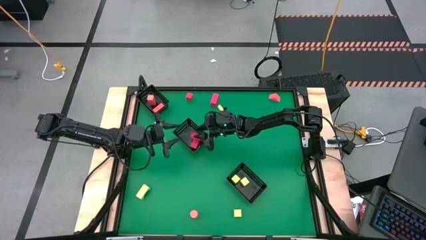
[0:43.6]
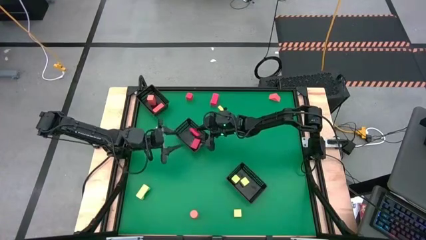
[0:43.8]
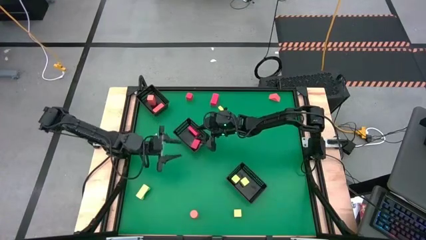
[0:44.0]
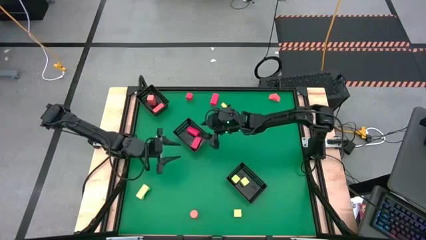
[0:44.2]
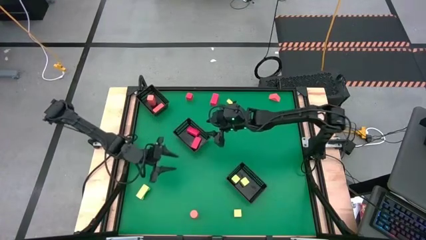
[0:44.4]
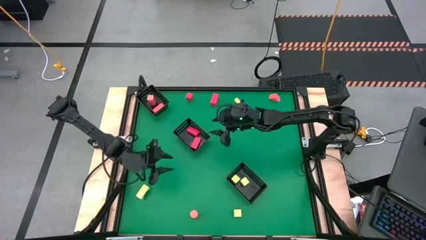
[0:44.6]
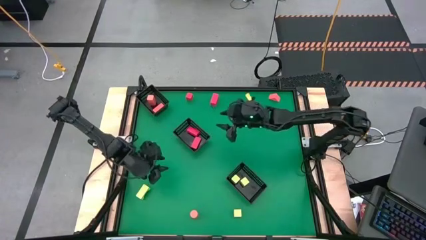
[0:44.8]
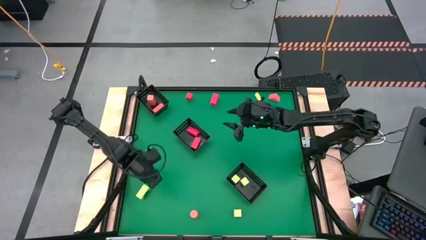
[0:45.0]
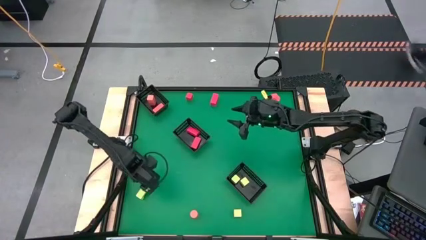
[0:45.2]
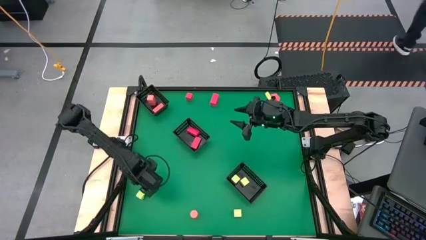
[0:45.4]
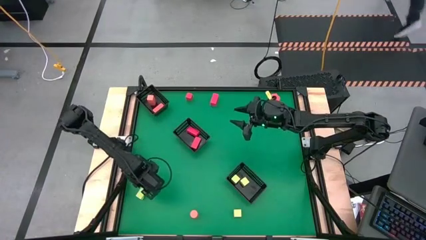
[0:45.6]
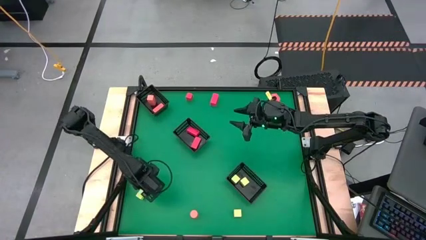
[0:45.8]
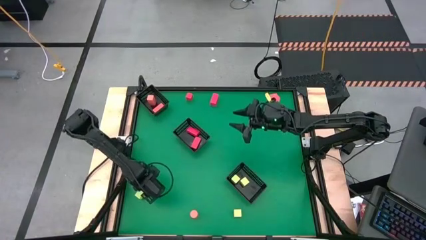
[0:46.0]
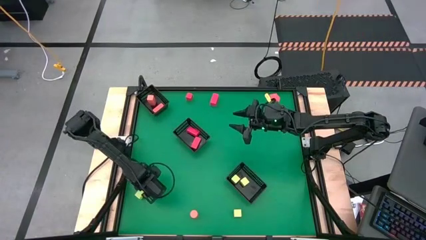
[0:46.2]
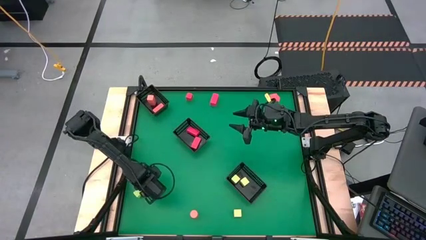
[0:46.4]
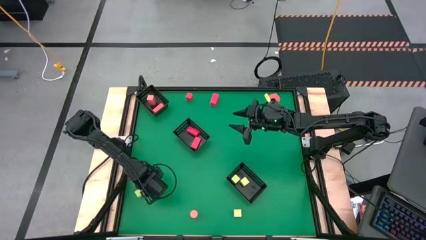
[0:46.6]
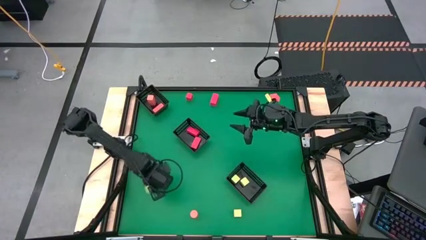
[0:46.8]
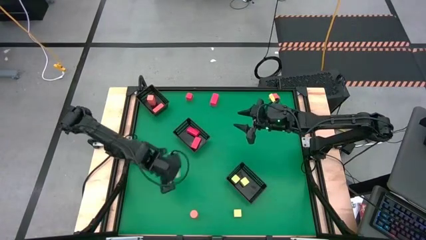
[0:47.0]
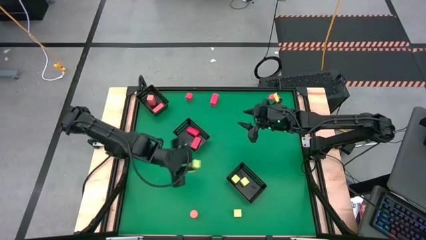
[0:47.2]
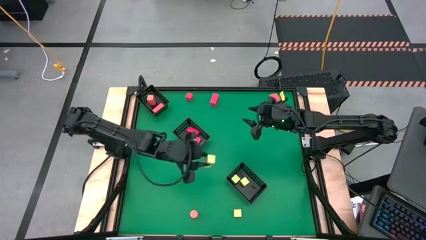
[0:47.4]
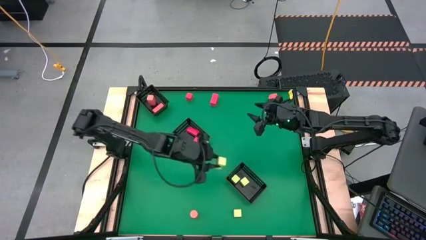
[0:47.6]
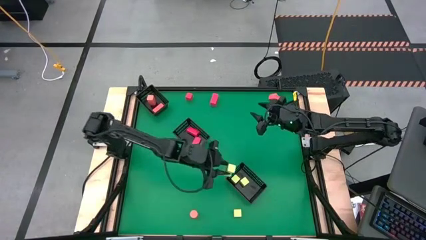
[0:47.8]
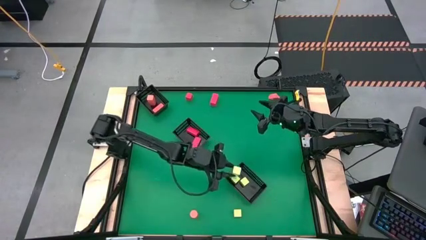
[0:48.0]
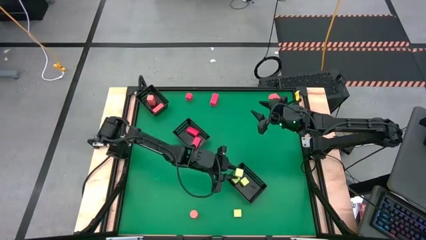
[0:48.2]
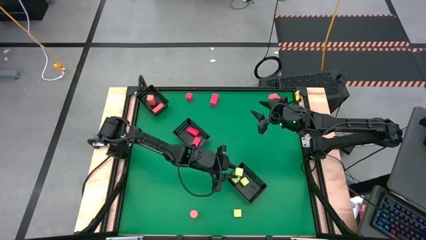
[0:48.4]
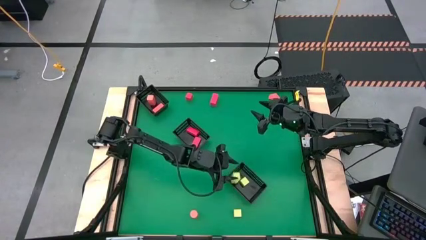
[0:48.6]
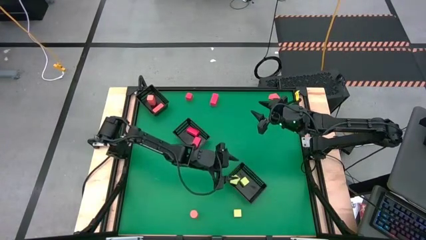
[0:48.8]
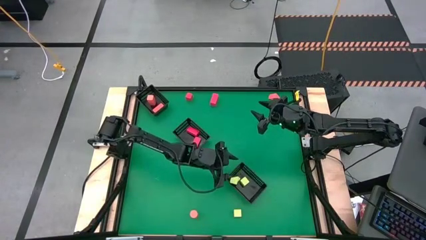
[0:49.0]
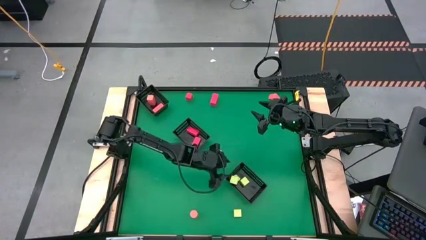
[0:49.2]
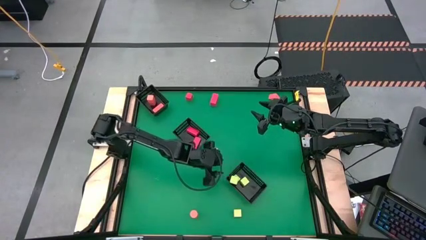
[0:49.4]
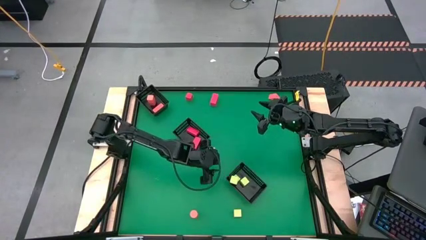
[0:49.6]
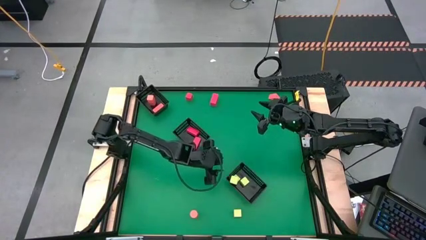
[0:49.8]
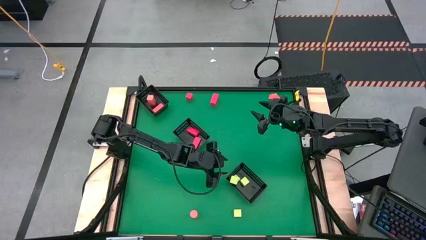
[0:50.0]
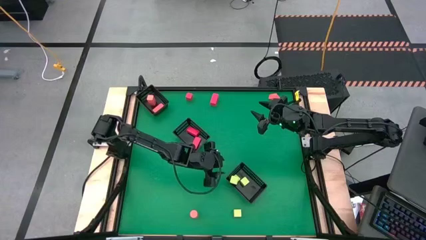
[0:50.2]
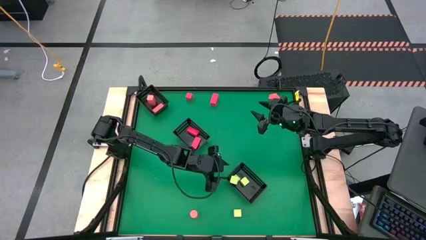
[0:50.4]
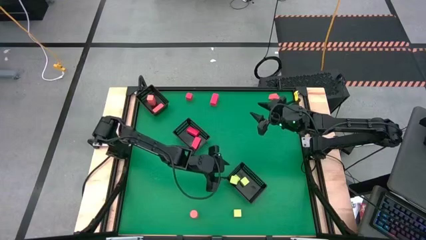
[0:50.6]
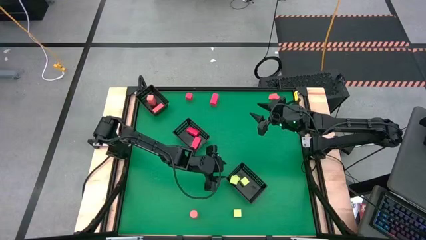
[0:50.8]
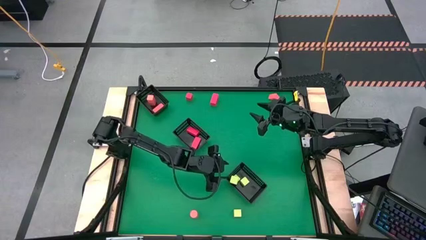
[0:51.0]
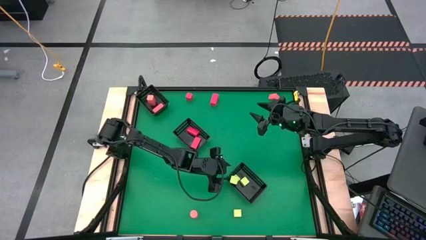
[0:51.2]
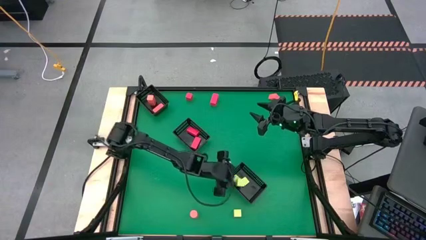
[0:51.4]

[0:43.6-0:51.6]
Task: Sort & place blocks by color
Put the light green block into the bottom black bin

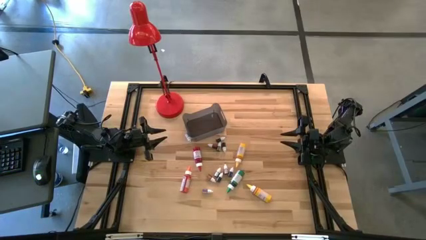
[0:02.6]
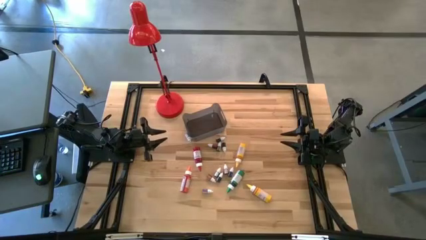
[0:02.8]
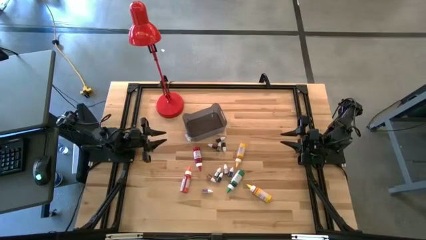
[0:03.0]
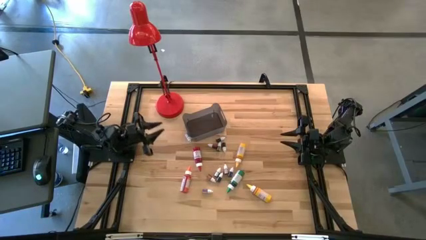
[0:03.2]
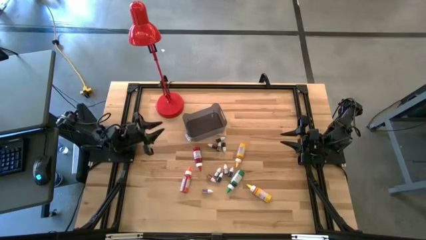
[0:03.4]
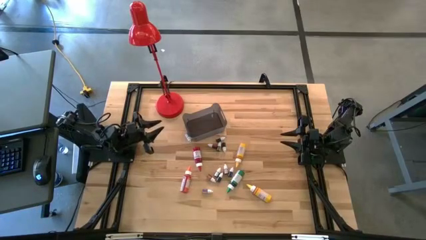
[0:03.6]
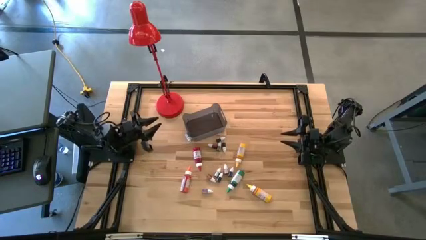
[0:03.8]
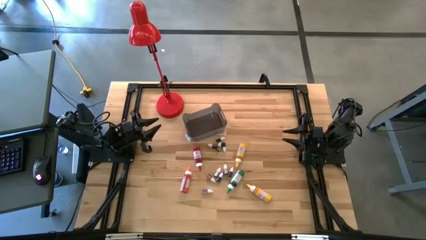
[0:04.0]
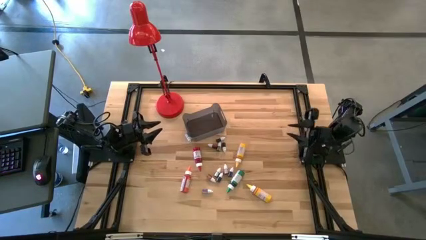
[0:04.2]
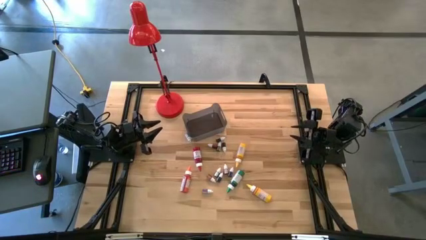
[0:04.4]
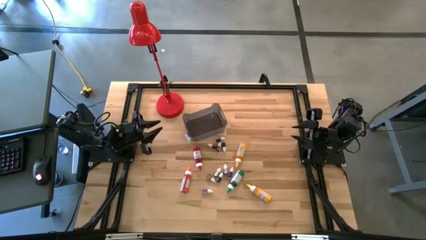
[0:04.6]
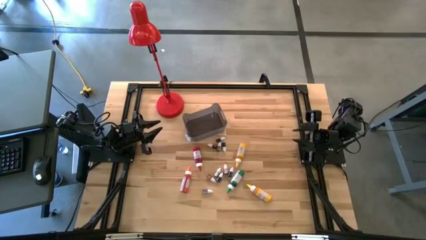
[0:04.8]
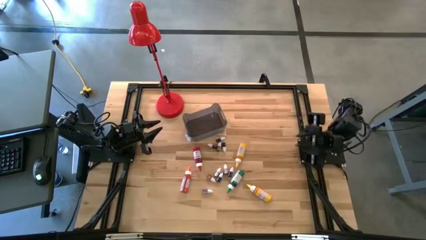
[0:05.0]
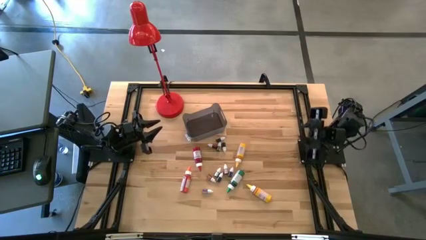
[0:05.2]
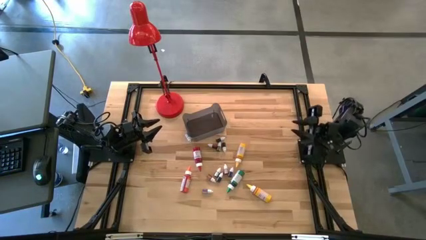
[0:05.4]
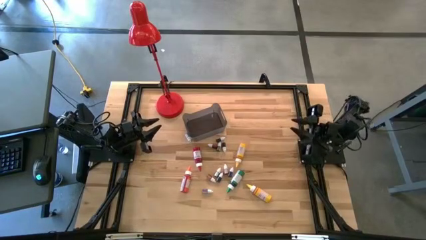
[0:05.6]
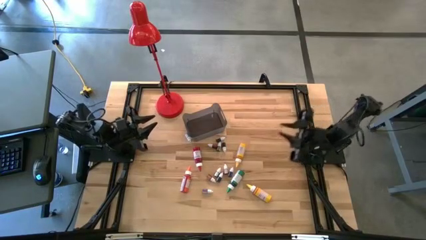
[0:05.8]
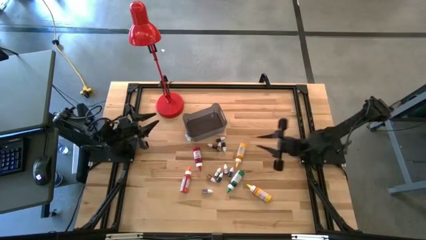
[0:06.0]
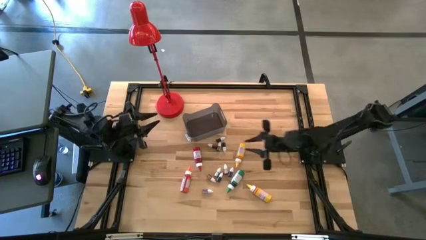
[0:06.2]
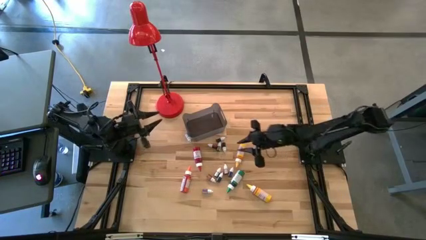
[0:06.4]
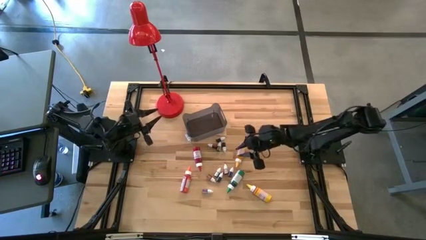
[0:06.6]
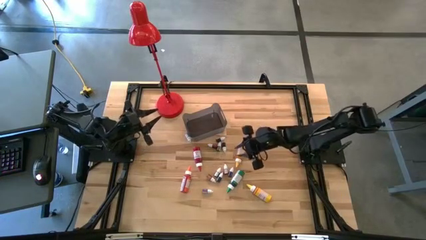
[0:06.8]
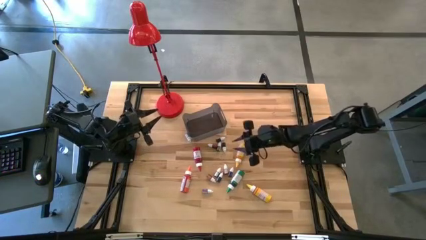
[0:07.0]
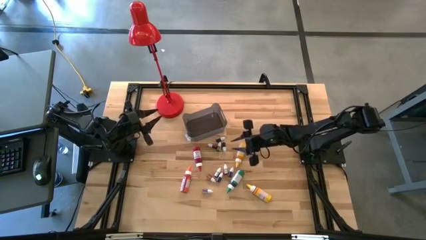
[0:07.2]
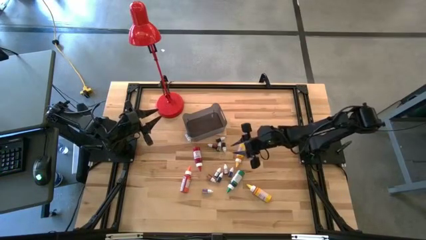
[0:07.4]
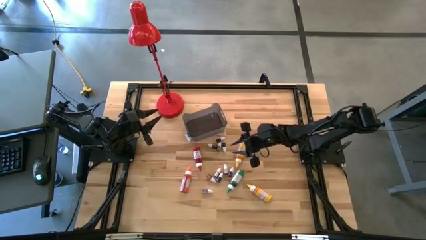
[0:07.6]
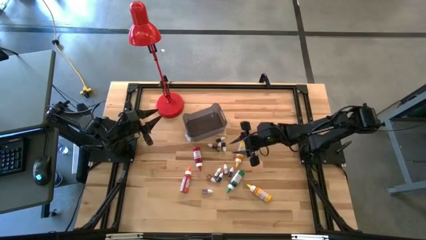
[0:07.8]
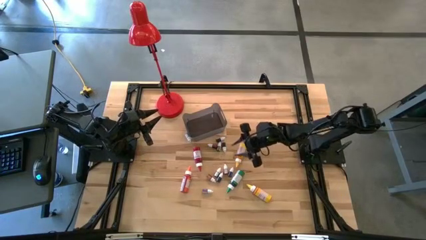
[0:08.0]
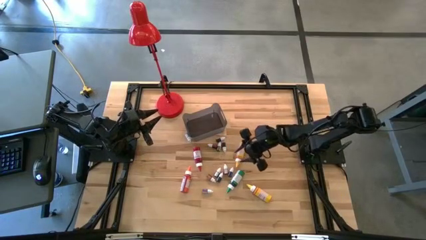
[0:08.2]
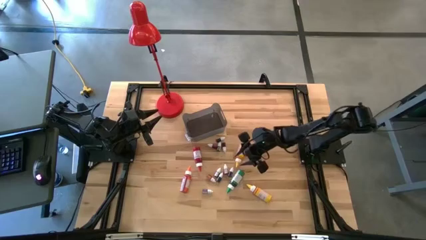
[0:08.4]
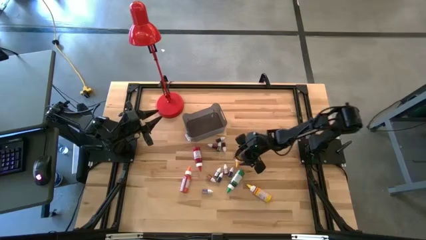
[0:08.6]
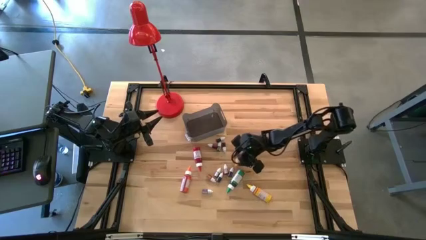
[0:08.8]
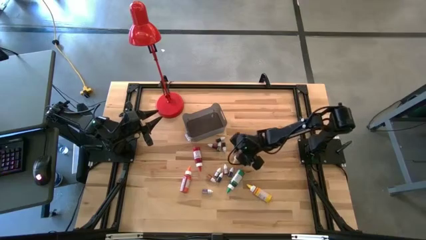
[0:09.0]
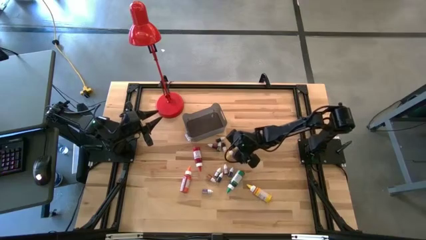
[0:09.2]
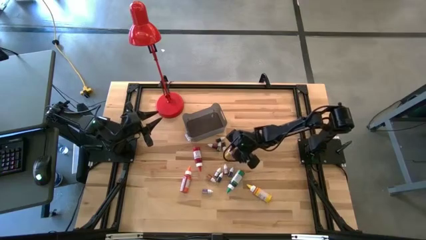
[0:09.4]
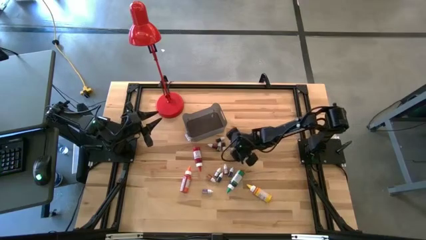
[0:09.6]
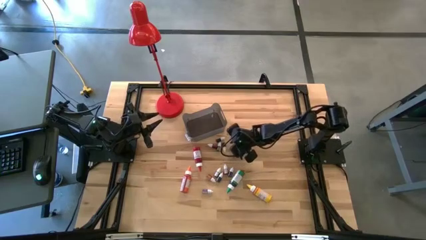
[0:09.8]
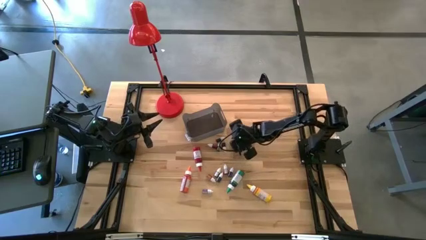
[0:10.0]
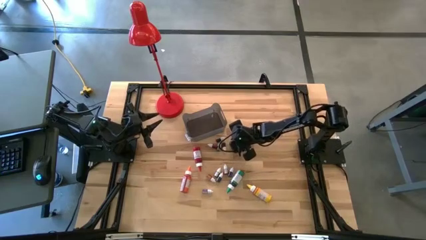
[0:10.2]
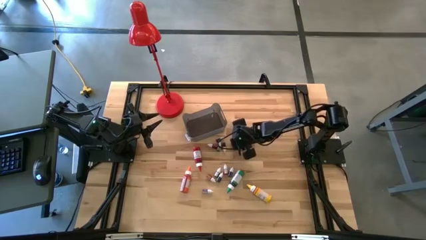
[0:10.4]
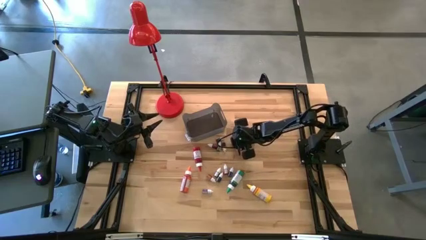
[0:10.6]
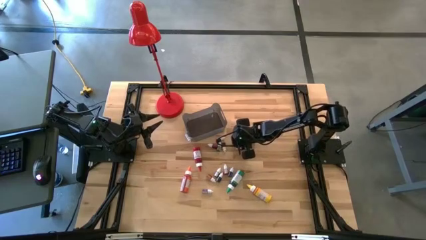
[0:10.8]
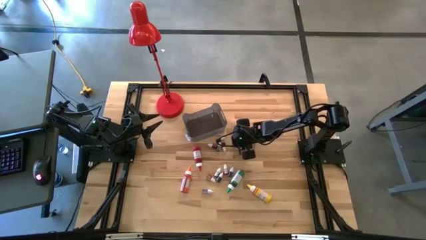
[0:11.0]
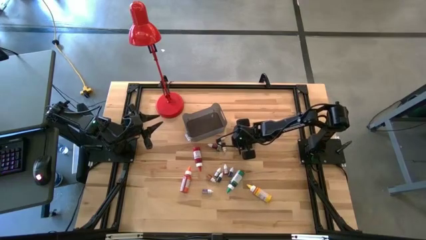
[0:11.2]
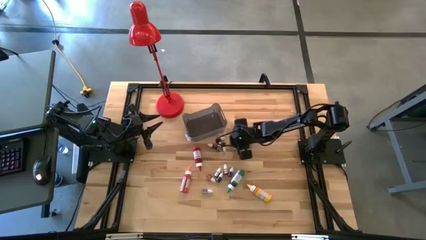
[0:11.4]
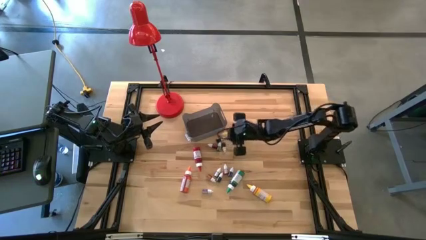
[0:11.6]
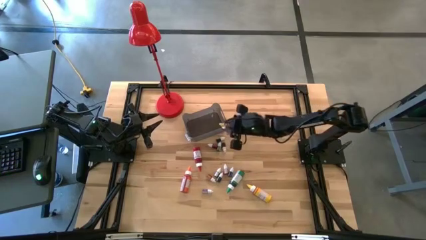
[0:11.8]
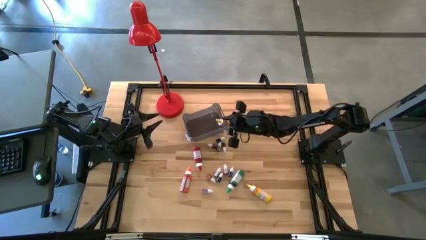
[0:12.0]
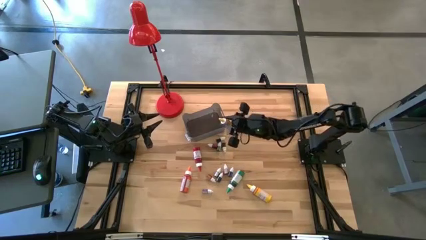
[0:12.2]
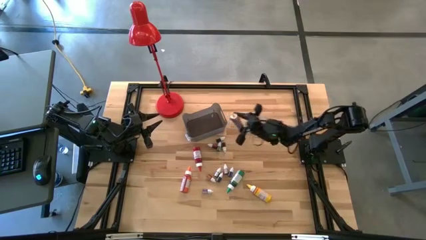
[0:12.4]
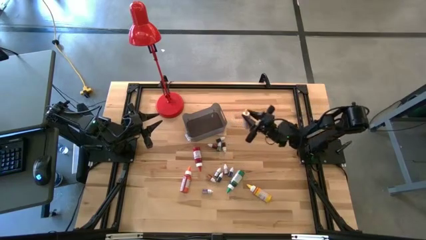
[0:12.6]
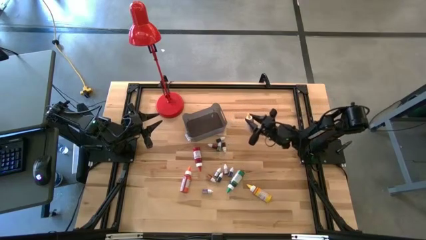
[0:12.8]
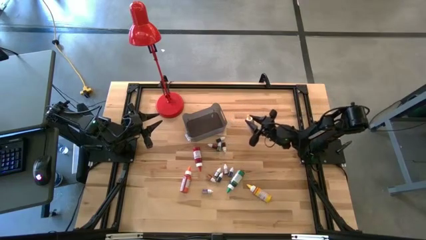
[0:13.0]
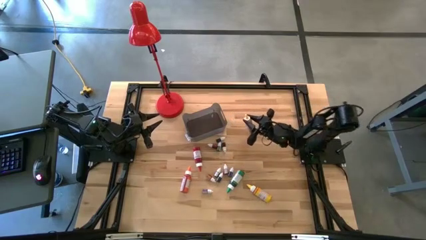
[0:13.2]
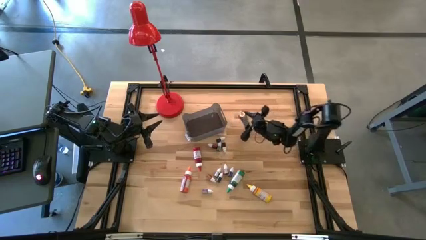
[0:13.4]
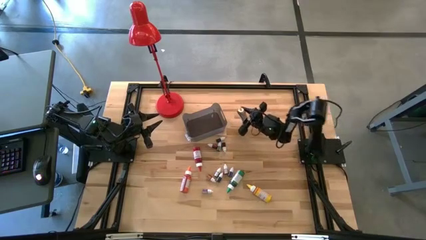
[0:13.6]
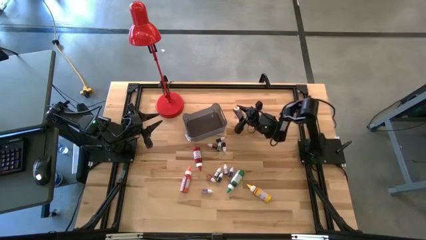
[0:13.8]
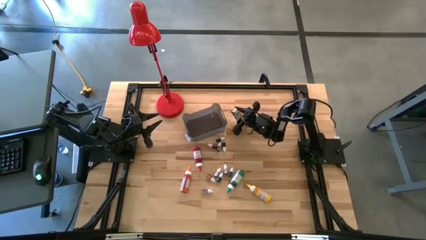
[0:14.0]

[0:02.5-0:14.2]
Task: Pick & Place food coloring
Put the top large yellow food coloring bottle into the bin
